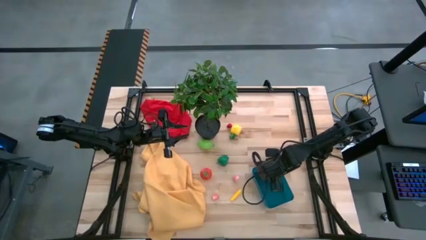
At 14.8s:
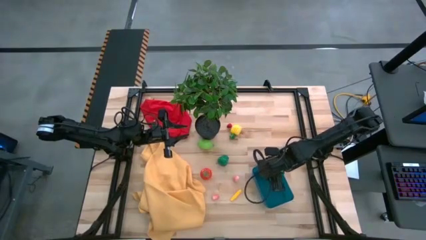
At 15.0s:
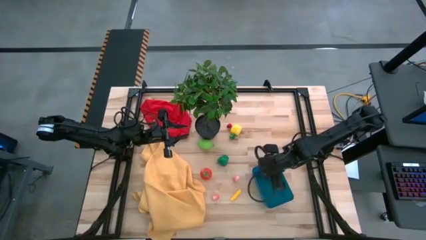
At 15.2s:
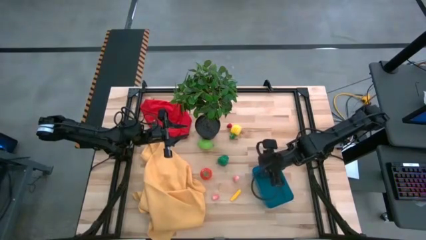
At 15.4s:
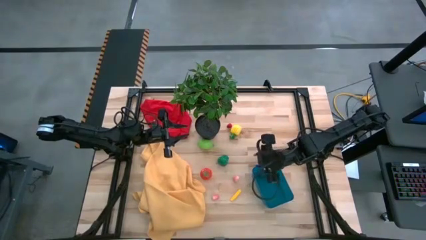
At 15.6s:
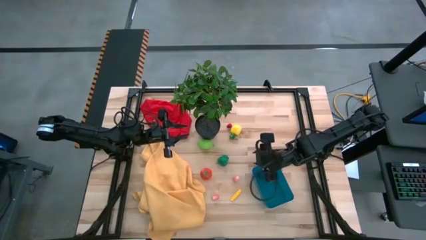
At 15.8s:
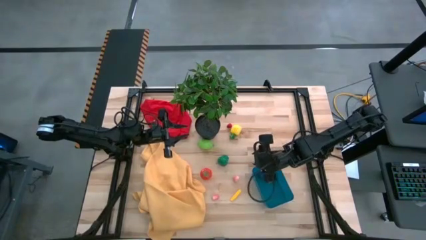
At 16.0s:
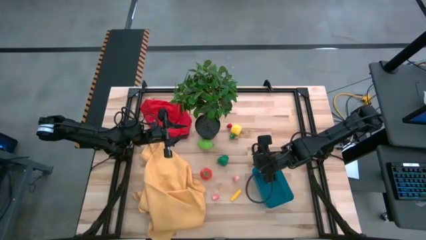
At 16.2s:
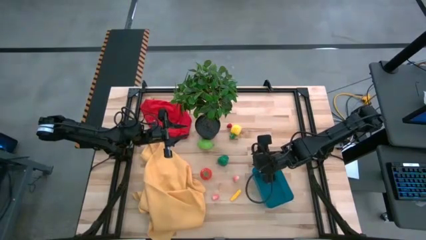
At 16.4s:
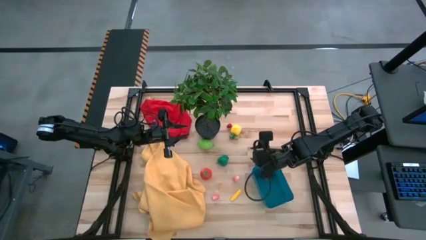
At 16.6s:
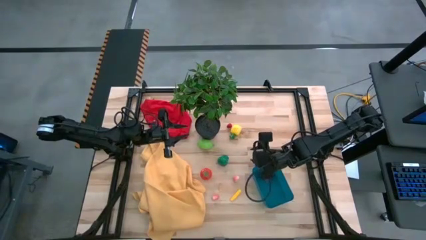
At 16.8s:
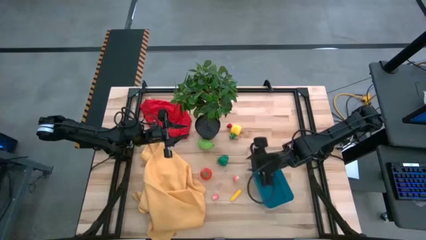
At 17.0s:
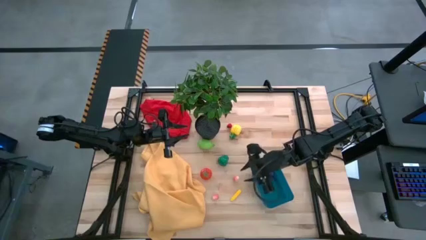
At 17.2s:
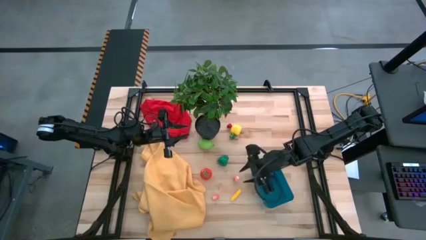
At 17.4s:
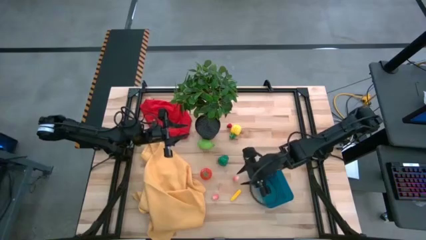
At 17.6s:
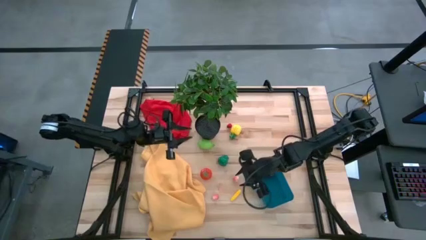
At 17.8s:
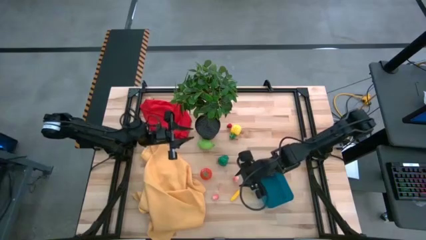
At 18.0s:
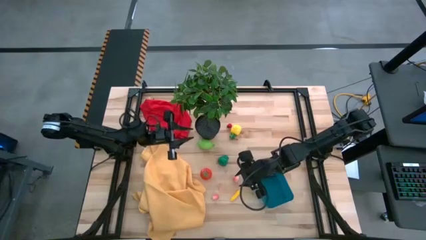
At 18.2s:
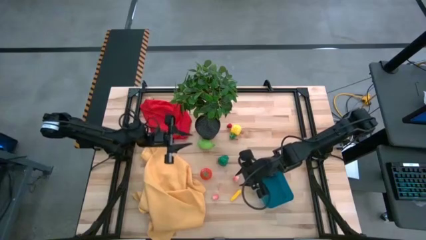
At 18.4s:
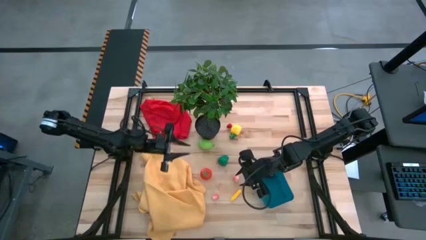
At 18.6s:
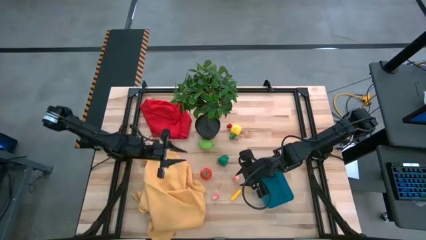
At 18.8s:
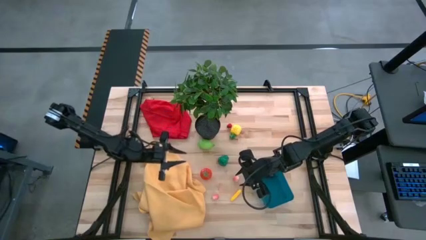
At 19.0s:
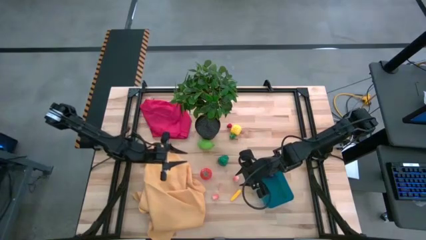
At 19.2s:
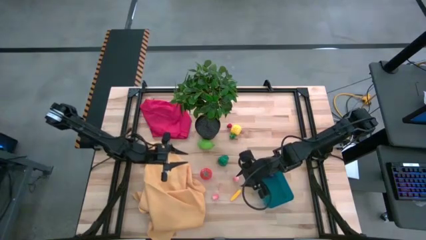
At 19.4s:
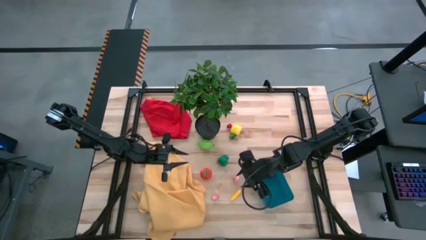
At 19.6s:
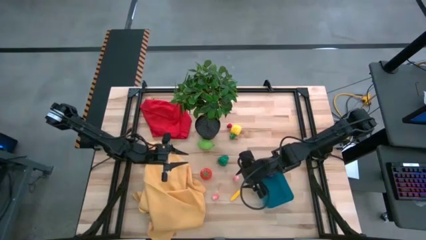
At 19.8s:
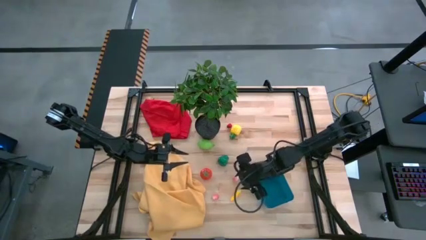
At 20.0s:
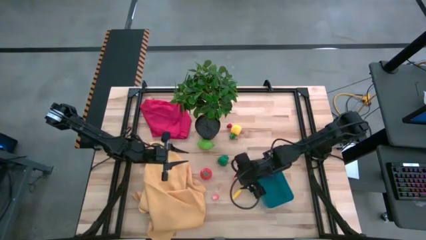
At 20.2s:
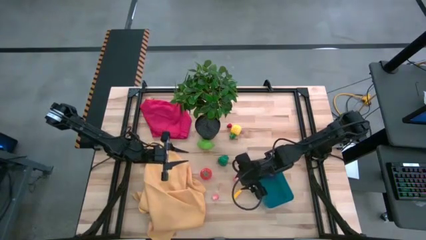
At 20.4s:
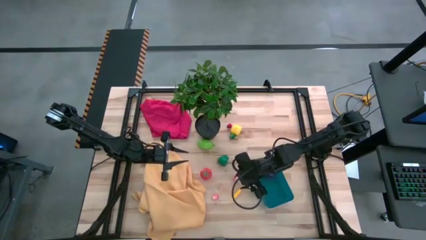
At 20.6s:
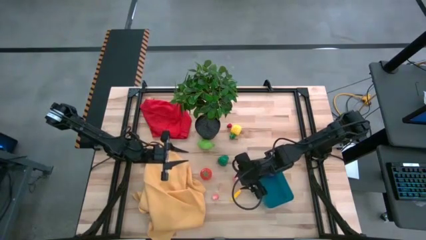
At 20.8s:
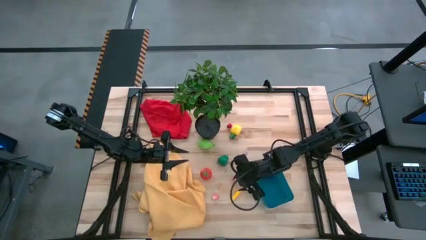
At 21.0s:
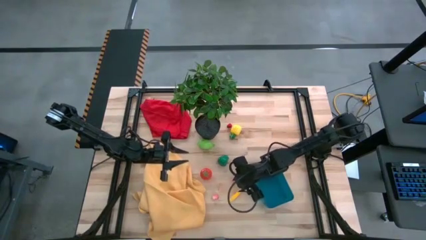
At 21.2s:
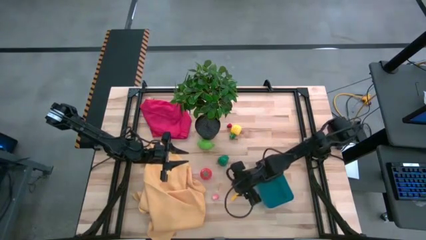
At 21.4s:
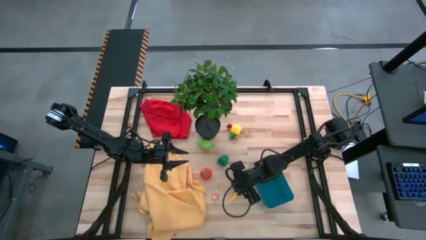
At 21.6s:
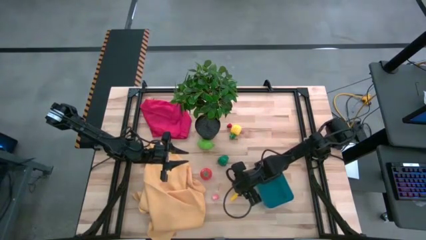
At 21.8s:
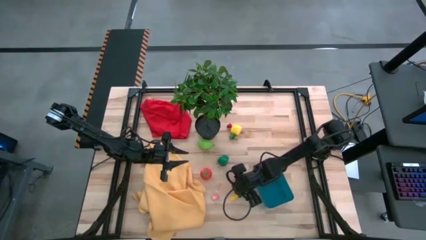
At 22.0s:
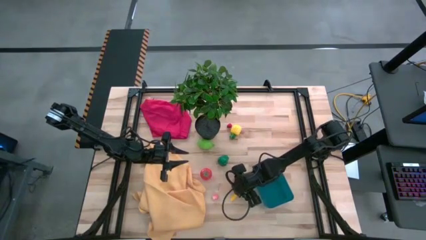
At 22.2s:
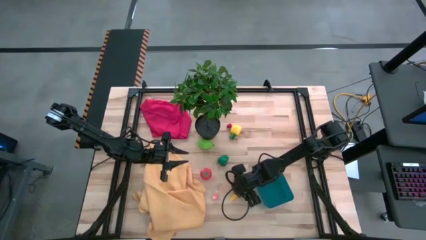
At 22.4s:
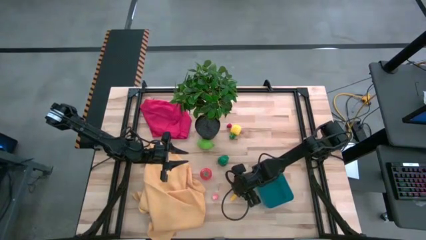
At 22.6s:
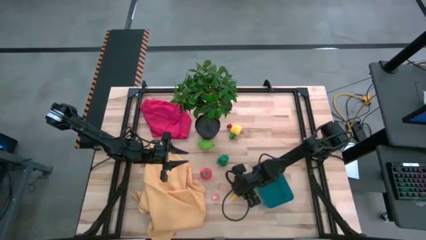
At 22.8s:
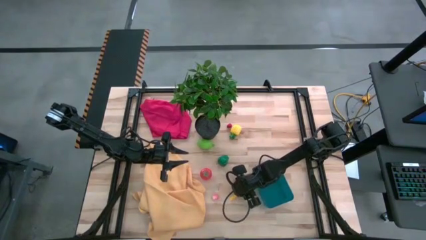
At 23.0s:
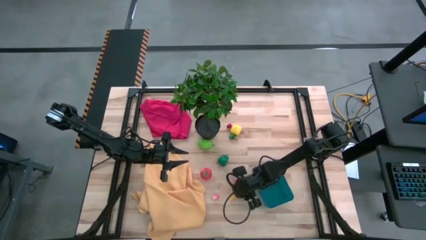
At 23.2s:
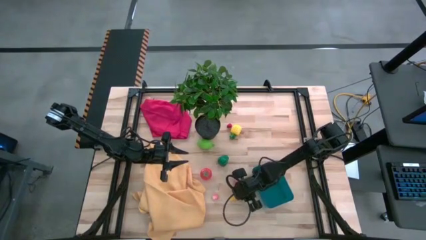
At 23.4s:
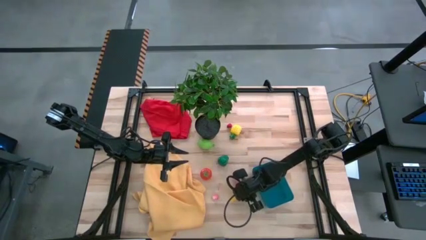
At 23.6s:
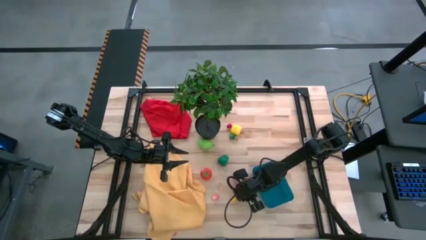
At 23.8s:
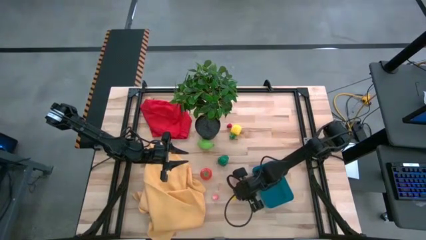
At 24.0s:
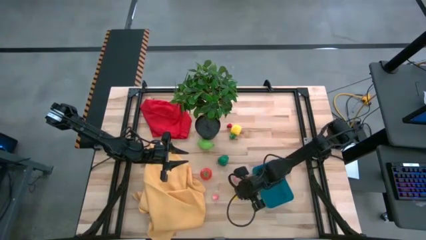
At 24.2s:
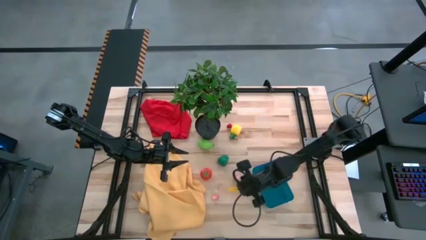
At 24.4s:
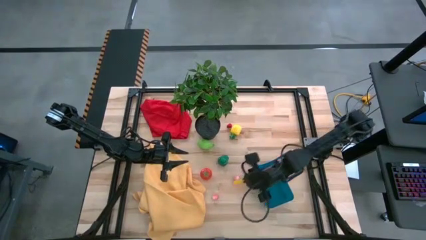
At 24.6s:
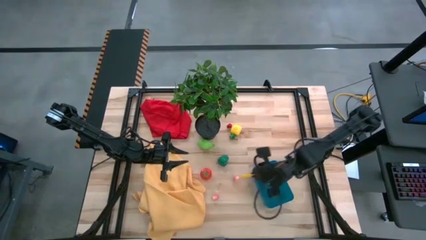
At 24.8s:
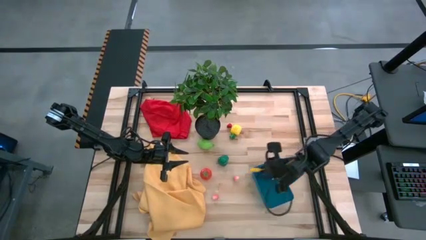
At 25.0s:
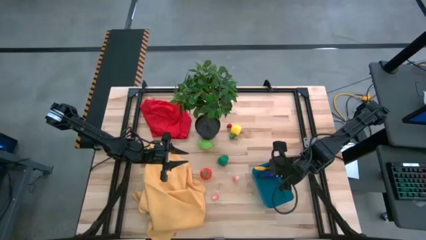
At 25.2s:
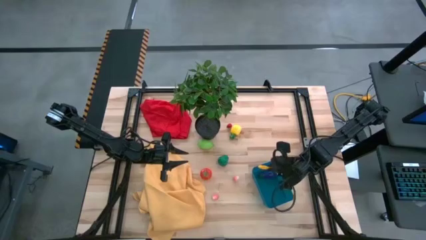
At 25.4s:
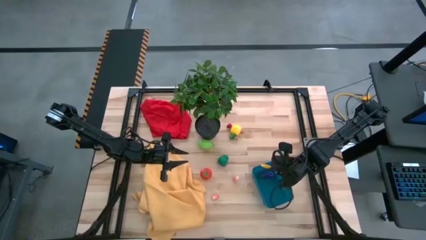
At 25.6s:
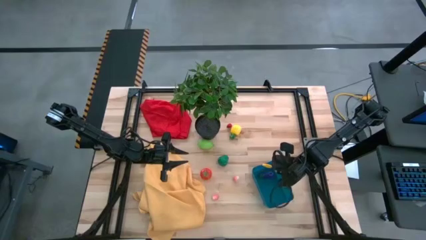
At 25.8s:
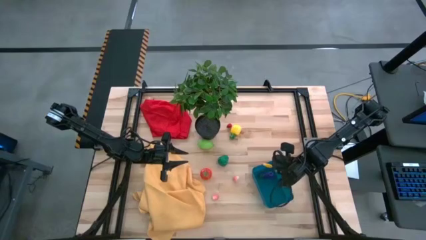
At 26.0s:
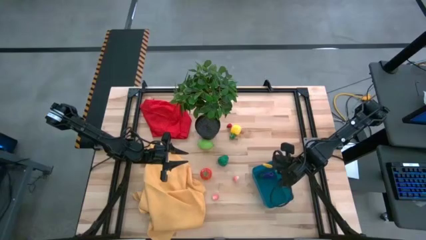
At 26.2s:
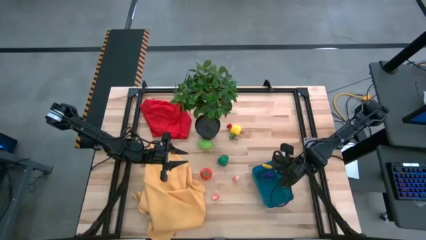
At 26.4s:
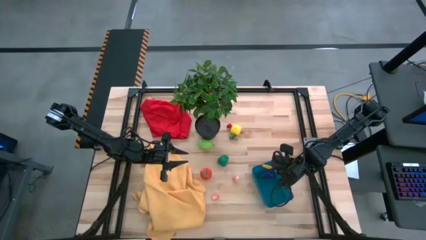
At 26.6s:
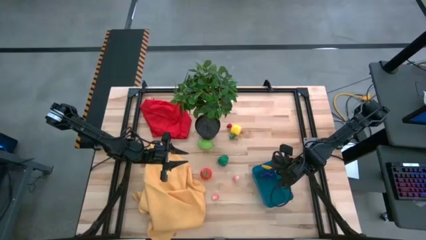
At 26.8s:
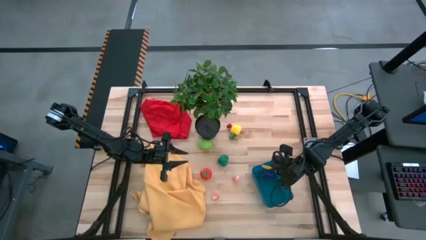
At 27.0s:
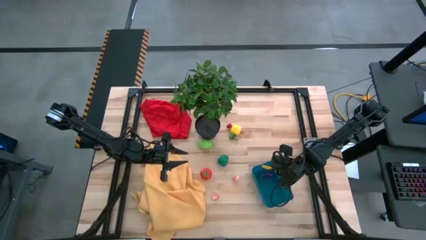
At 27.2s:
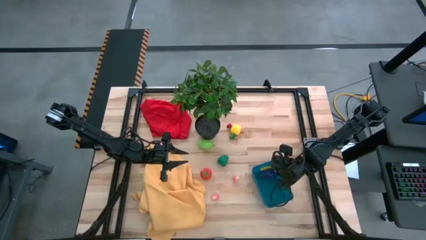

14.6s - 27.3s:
Task: Pick and placing Produce into tupperware
Put the corn into the bin
